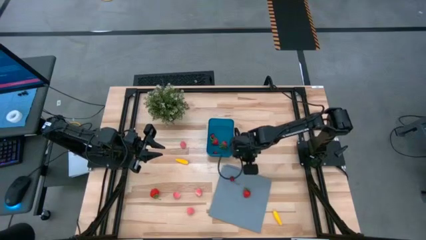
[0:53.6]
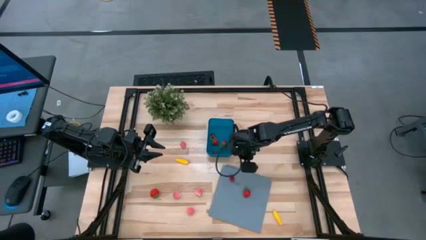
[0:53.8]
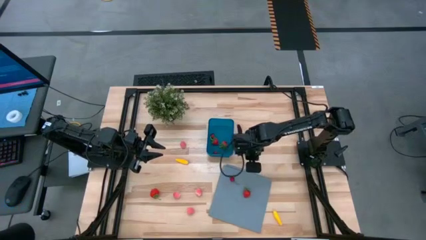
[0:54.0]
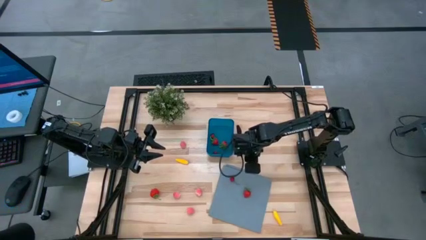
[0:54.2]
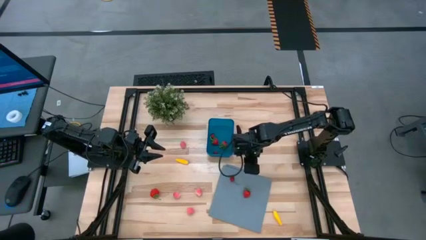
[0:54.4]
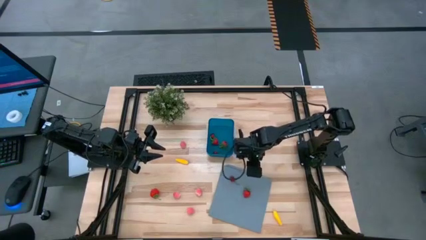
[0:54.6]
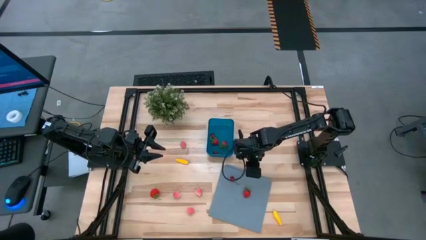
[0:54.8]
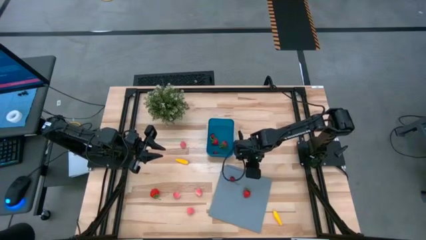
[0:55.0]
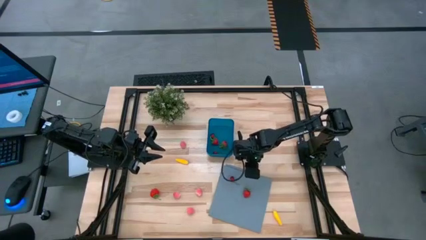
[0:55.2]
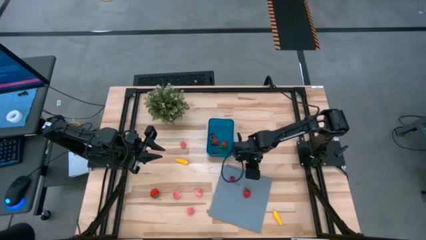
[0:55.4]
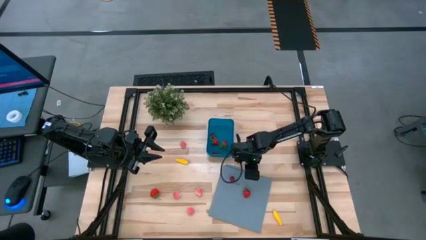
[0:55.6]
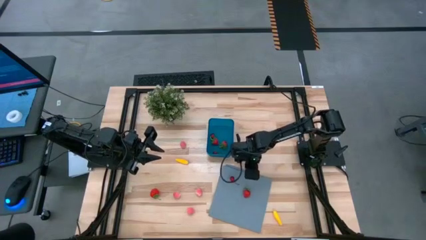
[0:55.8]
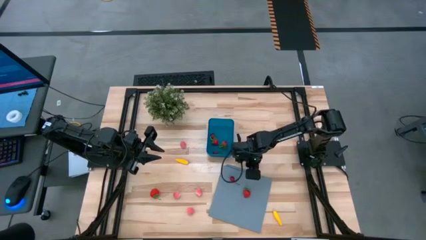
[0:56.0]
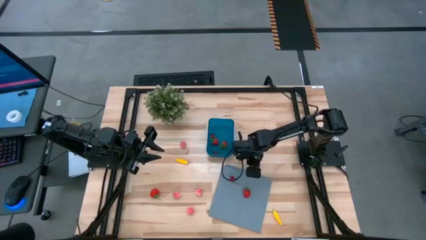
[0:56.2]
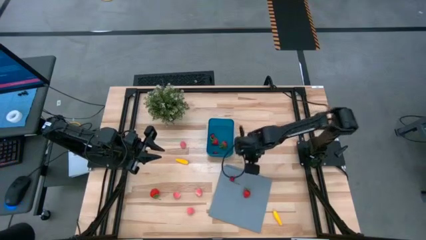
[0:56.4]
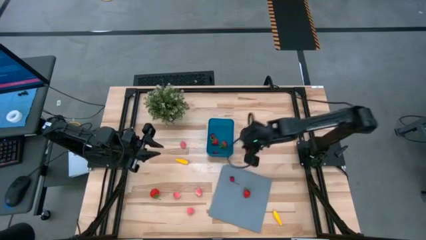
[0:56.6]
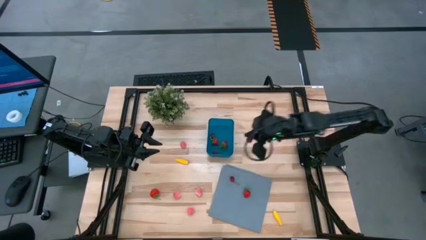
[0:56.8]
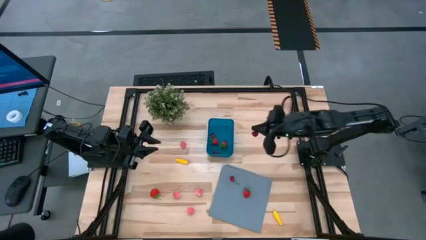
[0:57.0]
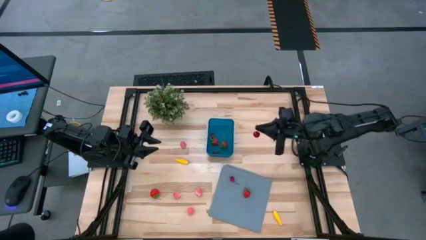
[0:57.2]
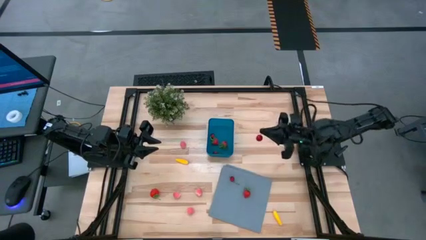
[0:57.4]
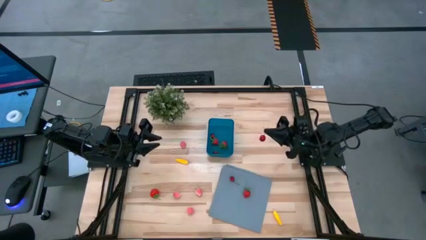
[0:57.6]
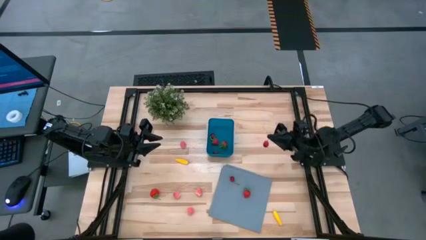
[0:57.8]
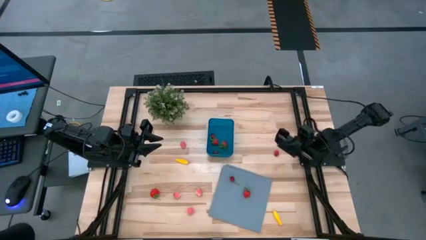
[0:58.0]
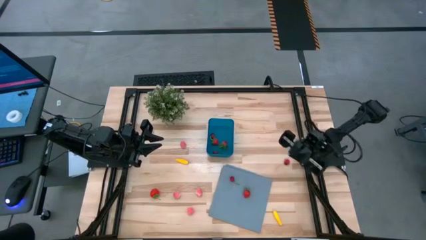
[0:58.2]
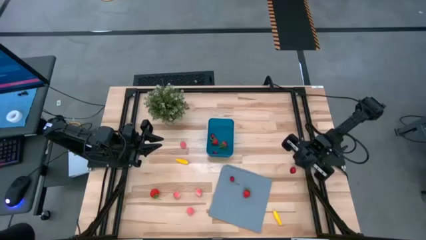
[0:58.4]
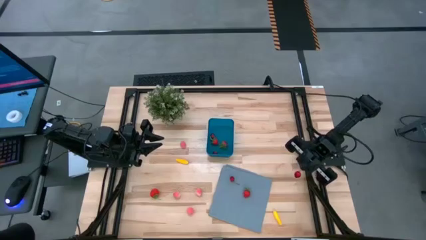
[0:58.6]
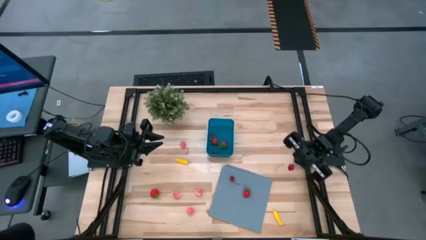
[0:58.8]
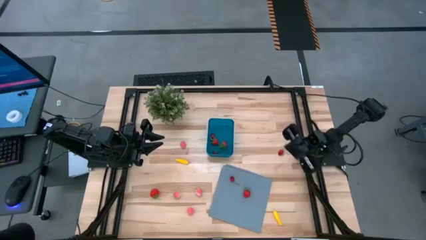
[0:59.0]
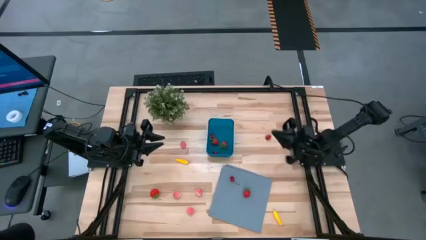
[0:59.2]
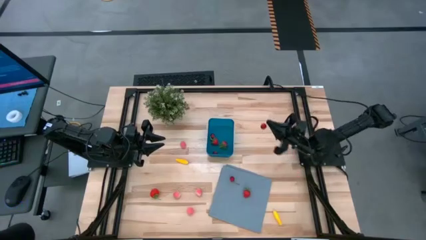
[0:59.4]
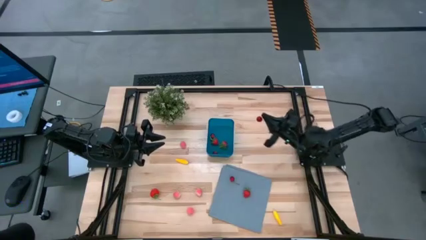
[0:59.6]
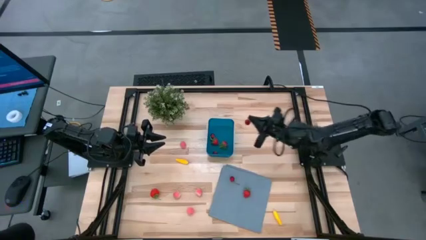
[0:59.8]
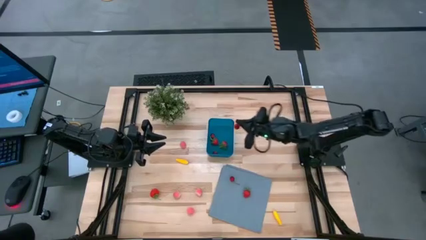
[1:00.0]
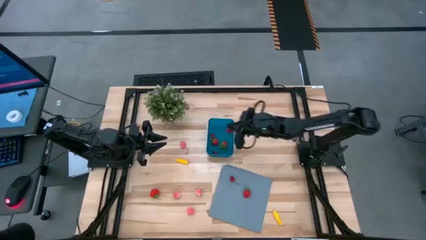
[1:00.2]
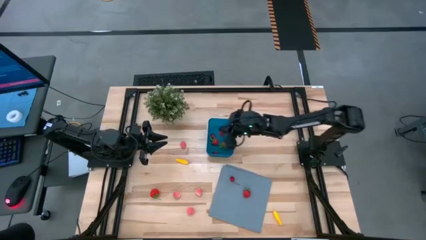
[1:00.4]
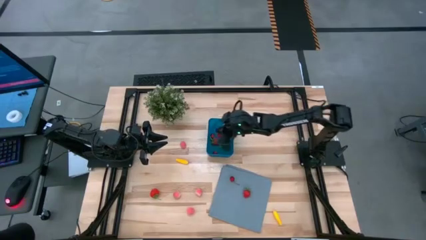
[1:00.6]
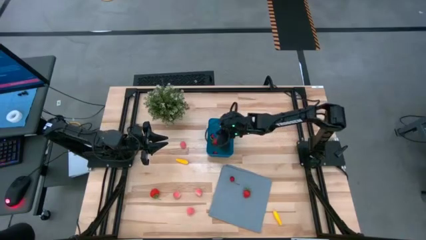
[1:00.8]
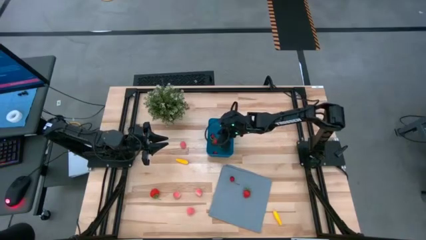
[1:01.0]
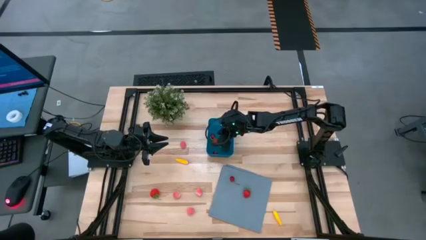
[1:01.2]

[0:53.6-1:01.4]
Task: Pick and placing Produce into tupperware
Put the cherry into the blue bin

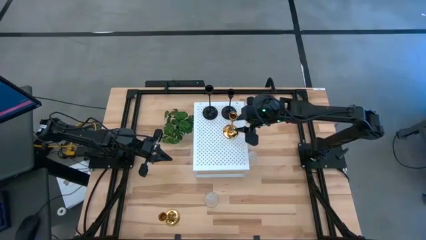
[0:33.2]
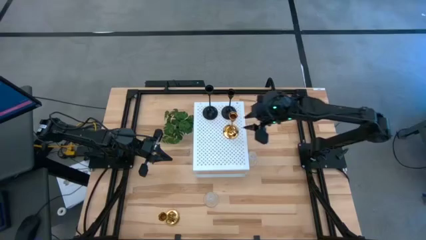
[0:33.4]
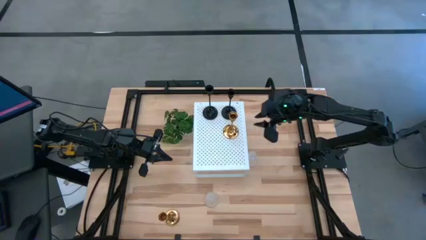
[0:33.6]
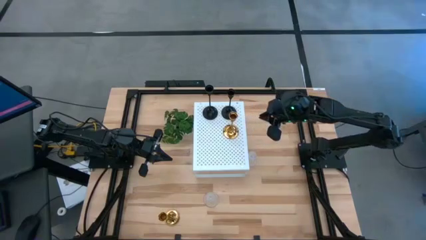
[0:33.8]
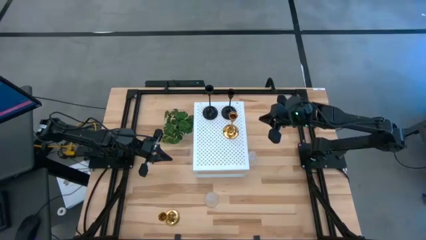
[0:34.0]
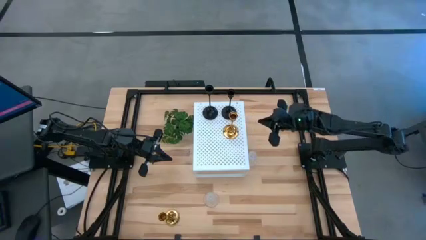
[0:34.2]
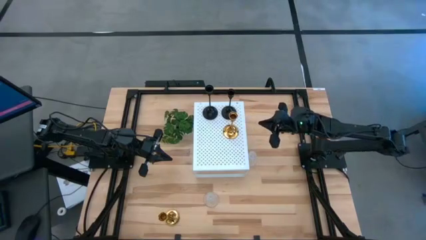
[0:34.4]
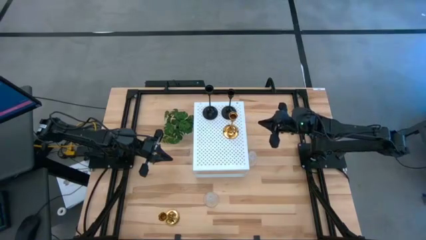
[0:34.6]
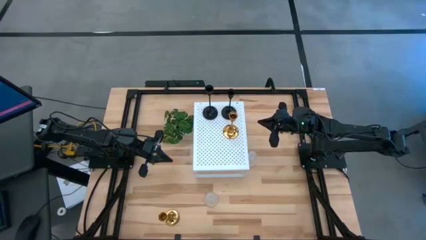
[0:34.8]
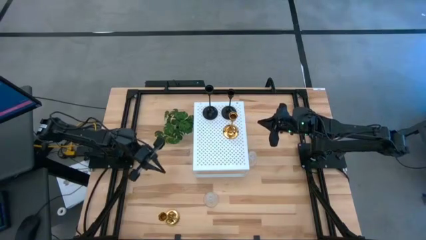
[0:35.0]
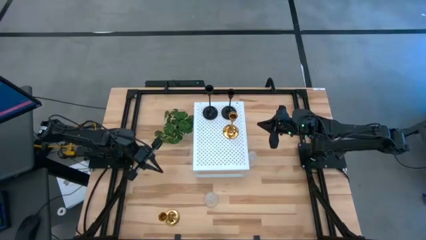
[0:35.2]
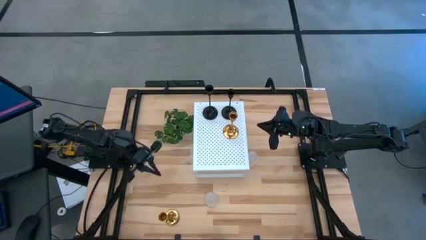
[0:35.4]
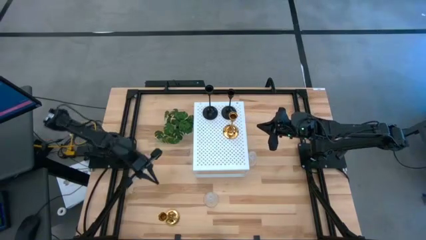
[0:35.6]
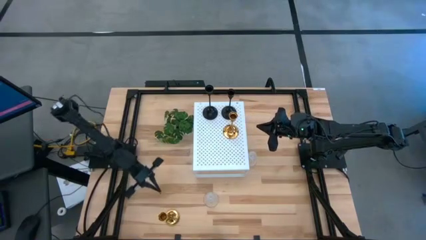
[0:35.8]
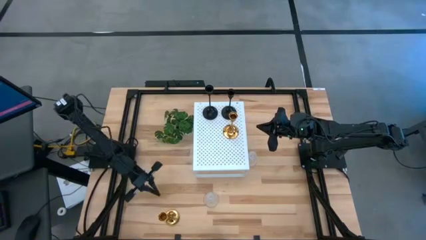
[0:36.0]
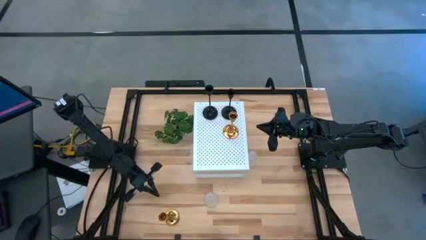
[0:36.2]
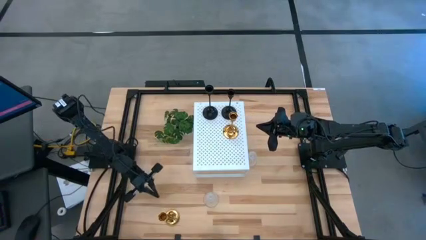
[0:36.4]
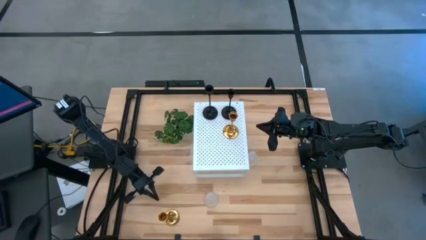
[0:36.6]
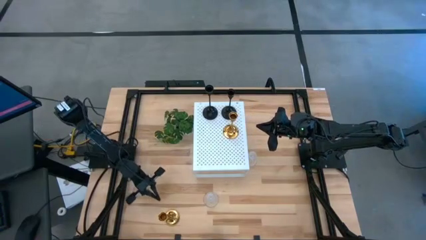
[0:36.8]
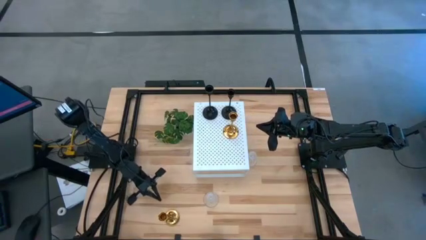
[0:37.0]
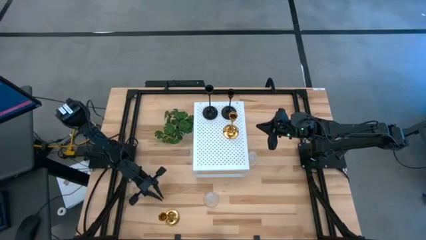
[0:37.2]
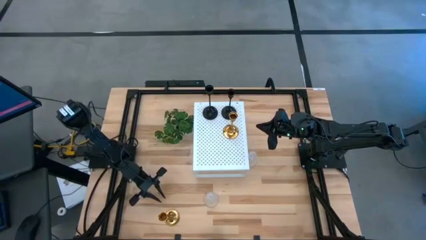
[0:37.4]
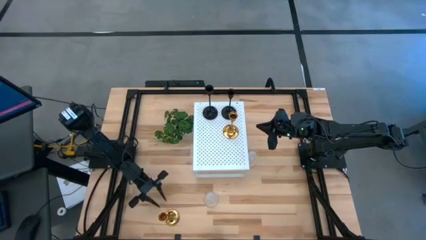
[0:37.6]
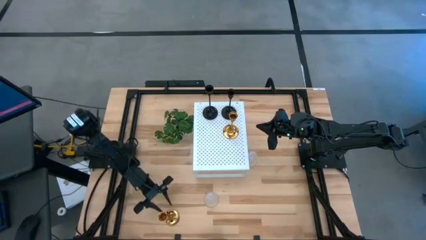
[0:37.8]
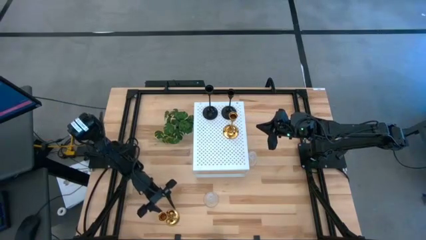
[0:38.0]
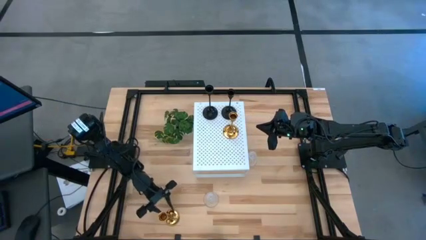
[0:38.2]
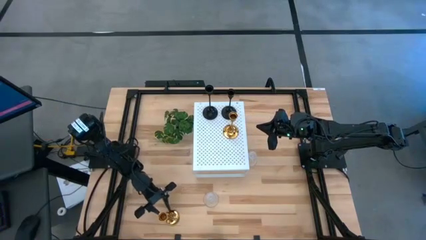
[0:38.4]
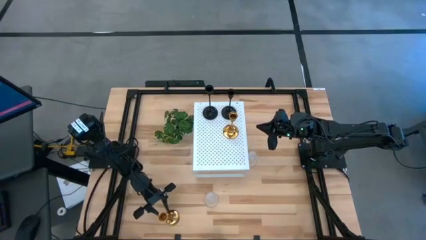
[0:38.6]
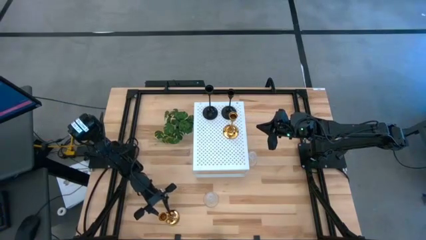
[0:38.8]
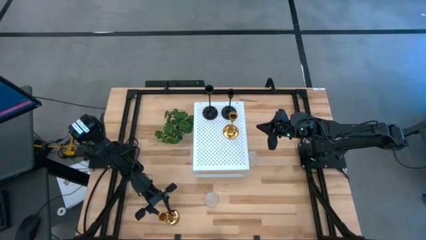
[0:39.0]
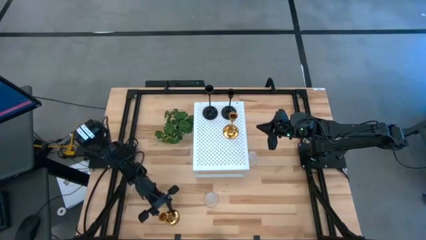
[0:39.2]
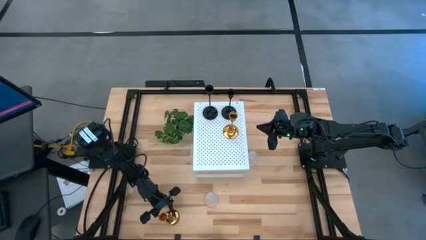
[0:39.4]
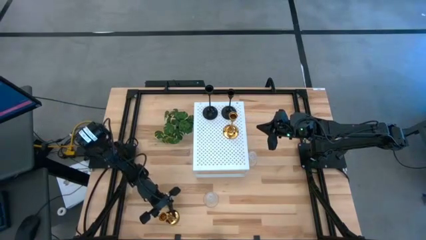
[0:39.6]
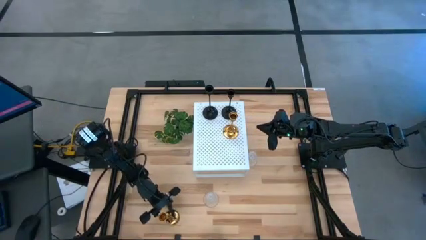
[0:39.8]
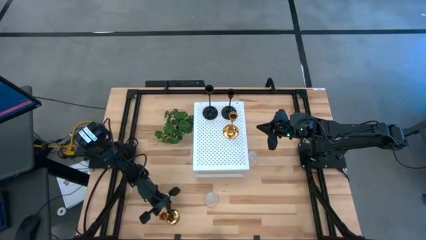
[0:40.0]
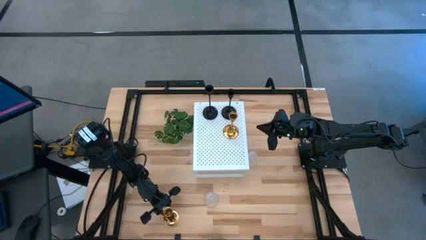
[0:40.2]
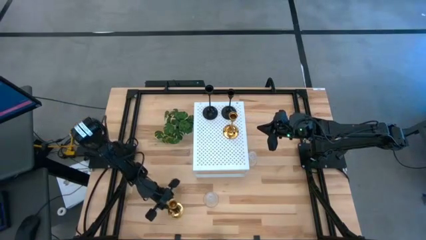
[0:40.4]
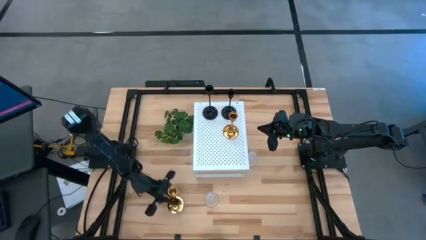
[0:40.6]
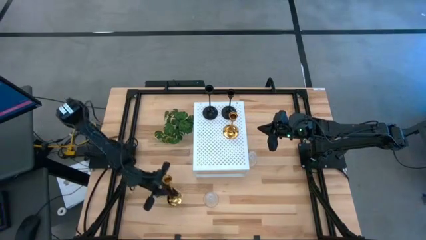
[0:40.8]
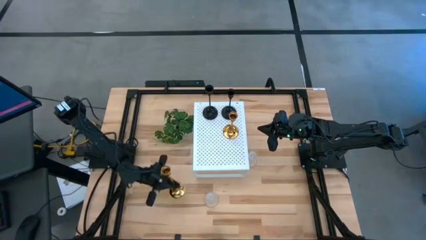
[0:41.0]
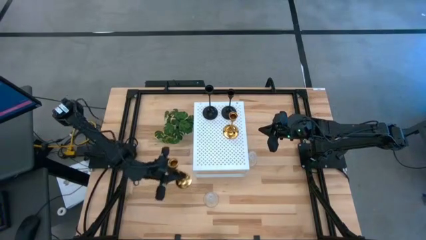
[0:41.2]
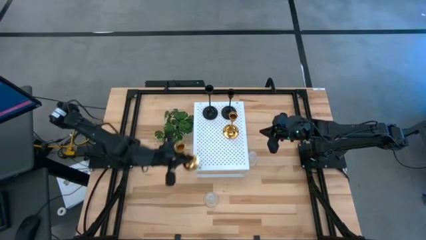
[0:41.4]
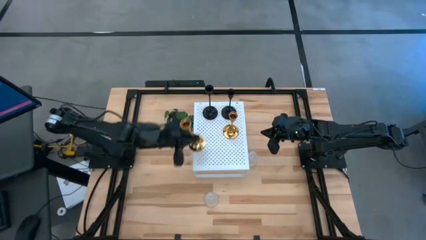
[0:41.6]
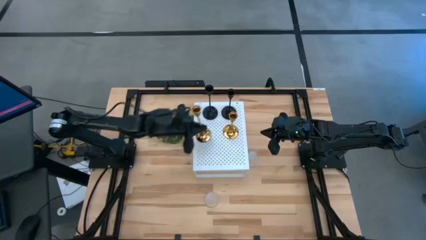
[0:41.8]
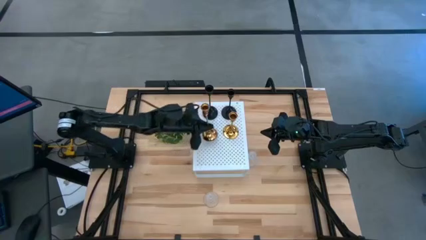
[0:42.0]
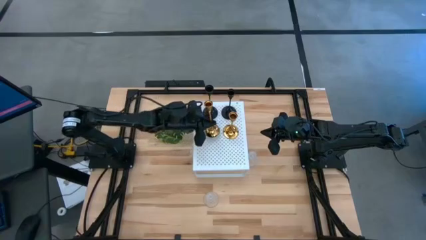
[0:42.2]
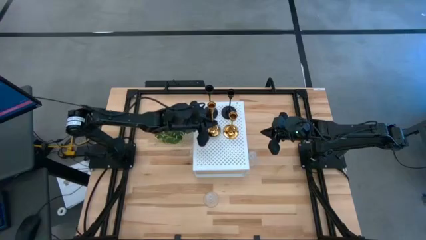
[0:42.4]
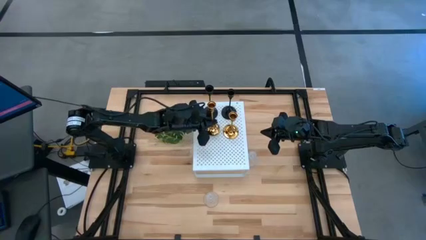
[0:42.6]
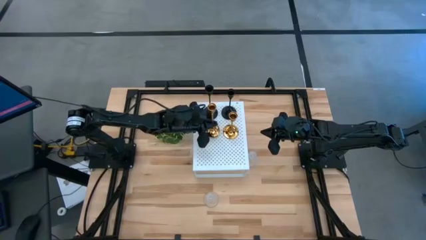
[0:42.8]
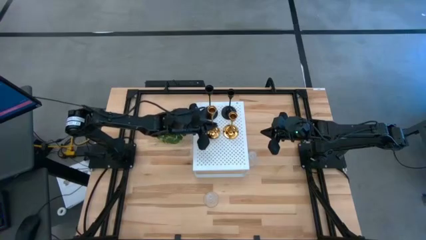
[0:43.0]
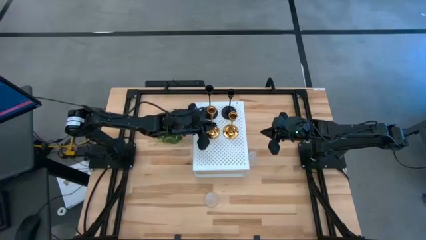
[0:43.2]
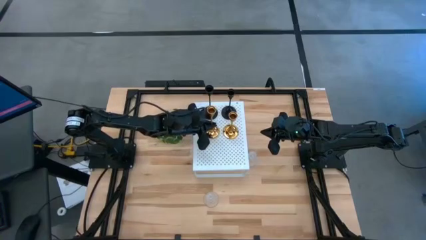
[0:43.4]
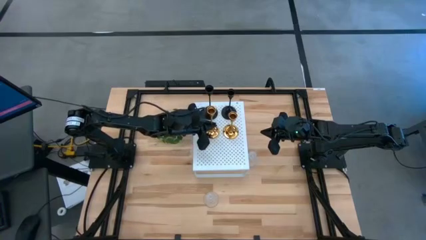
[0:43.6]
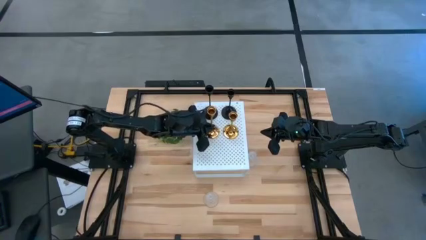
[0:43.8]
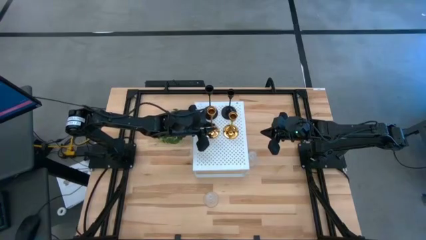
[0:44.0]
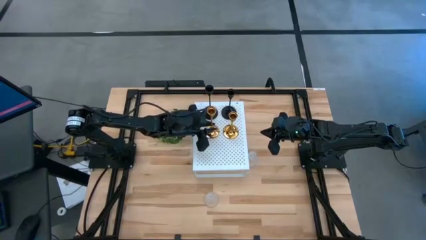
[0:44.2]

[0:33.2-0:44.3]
Task: Pick & Place candle stick holders
Put the gold candle holder on the shelf aligned with the other gold candle holder
